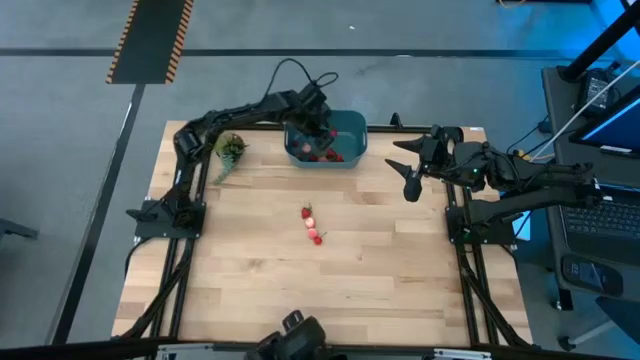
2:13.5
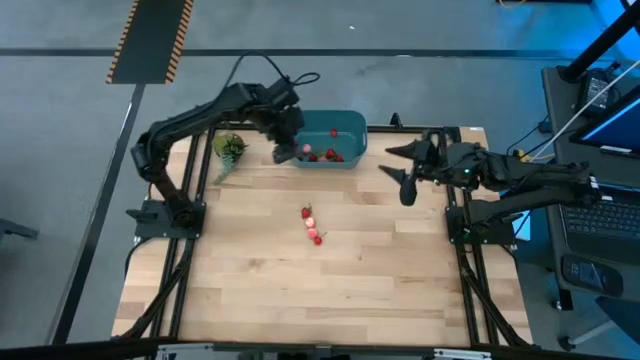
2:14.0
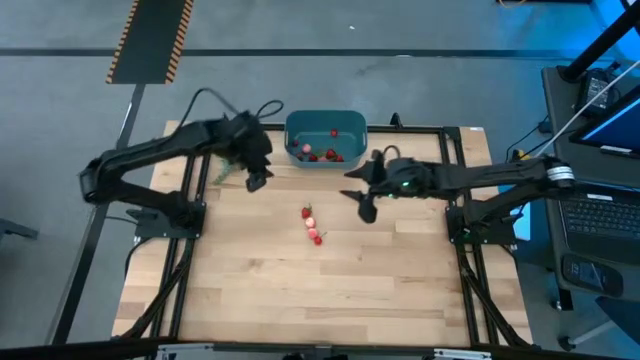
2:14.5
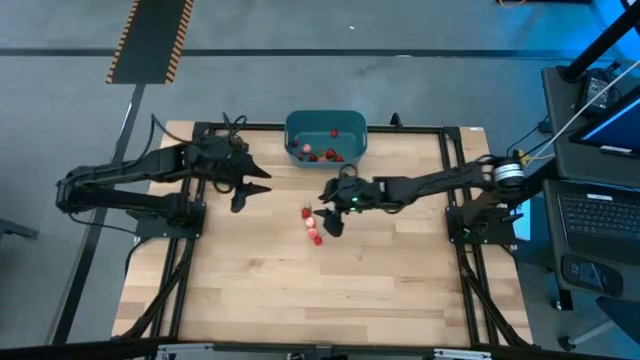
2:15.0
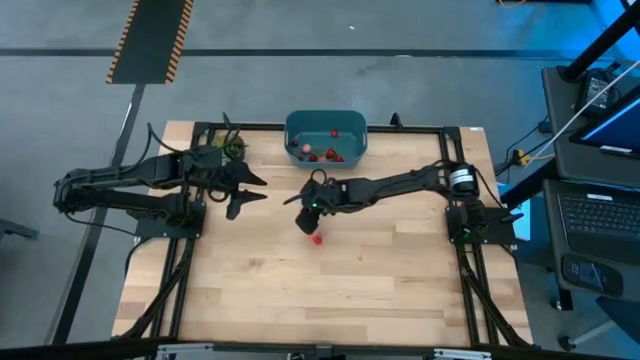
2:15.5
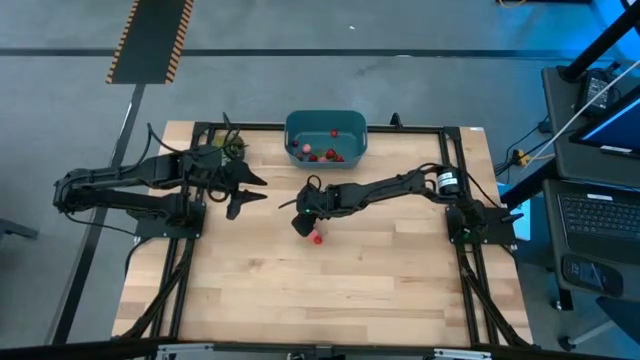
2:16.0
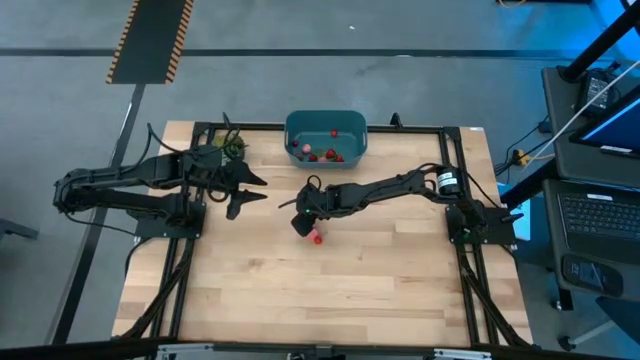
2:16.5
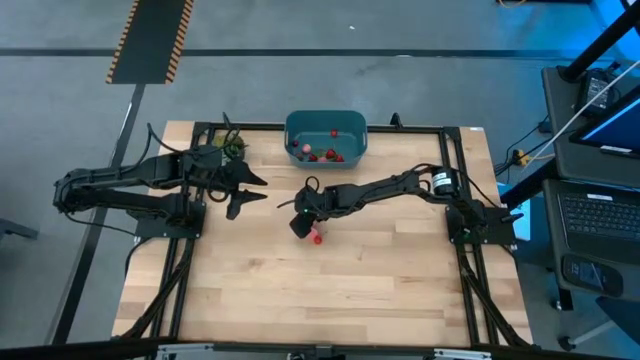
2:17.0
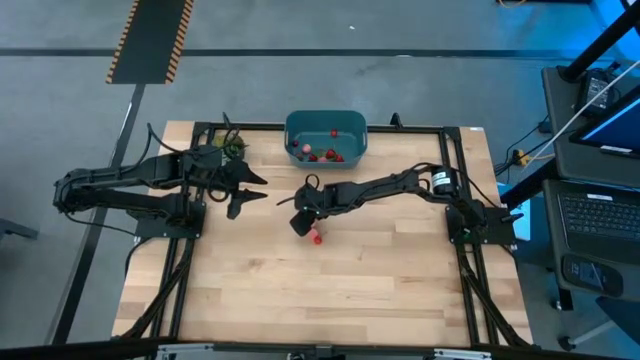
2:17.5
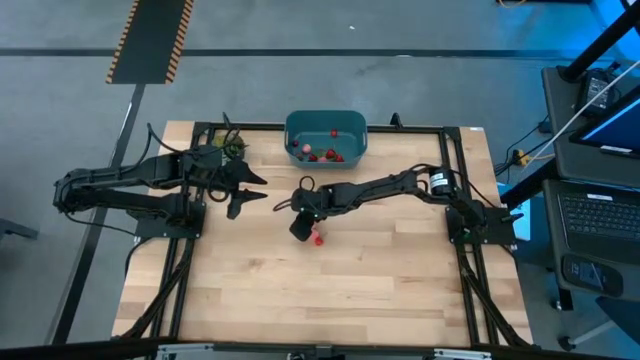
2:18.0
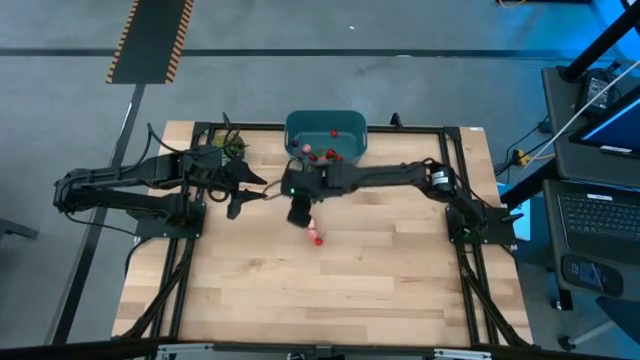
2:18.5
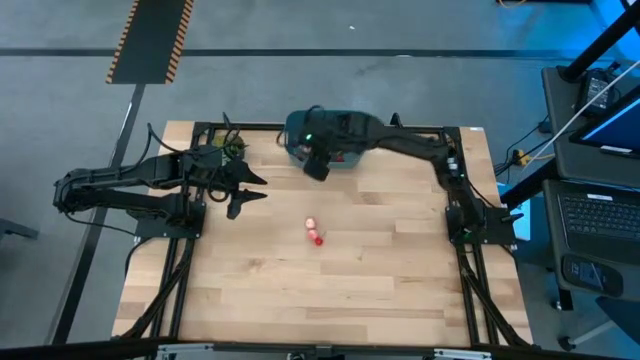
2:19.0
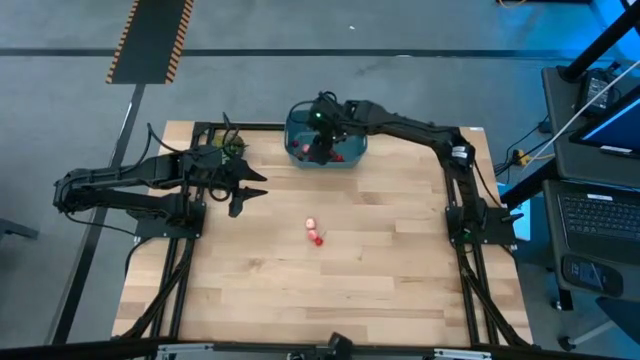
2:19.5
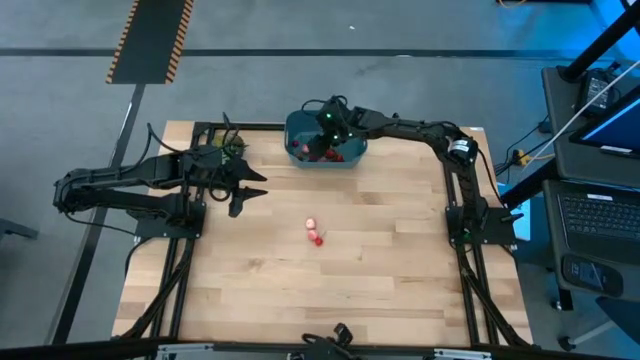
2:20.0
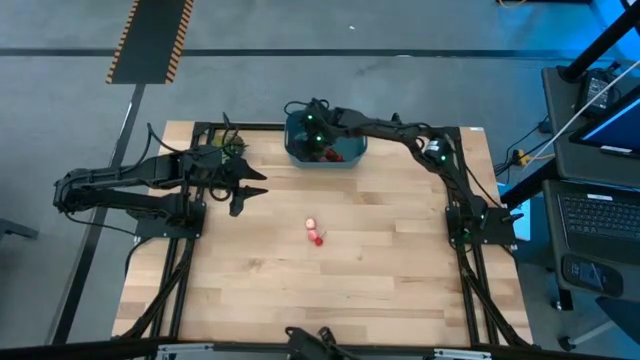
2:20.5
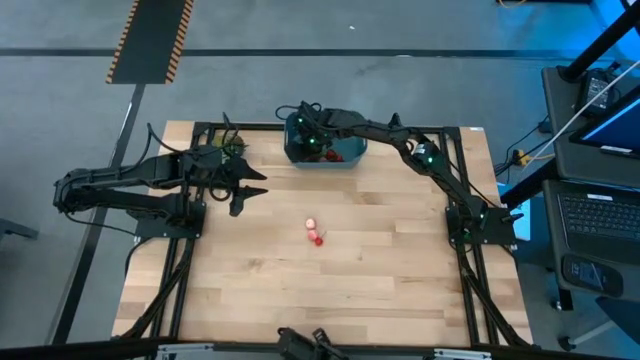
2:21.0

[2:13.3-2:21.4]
Task: Pick and placing Produce into tupperware
Put the strawberry into the blue bin

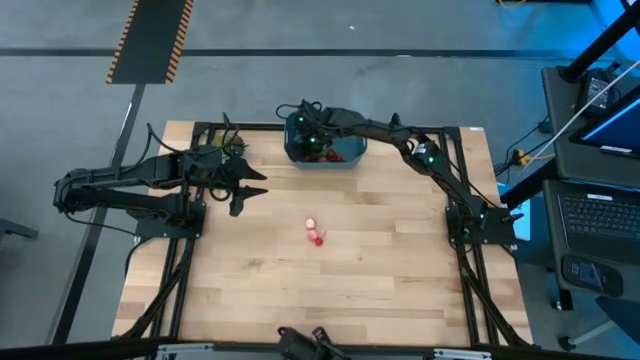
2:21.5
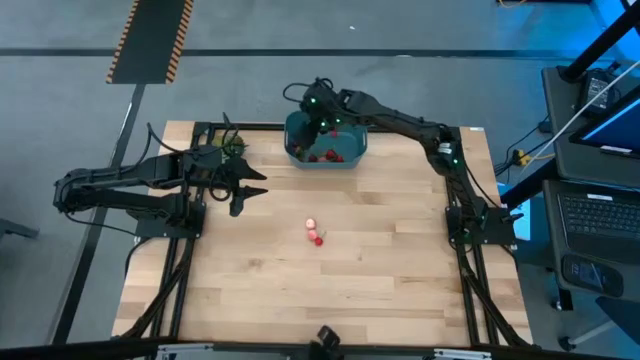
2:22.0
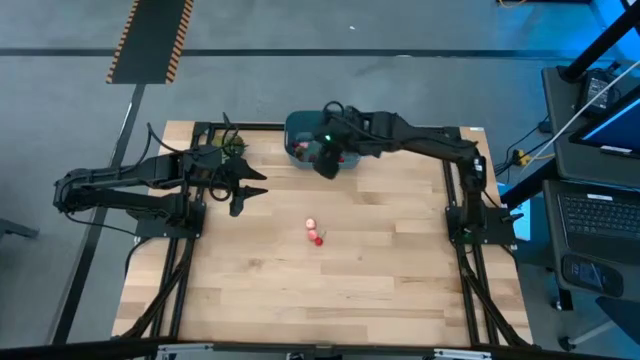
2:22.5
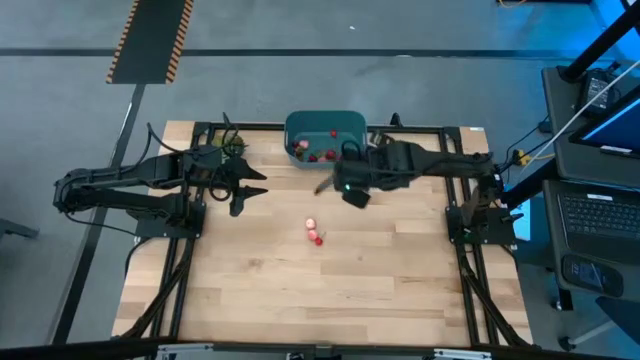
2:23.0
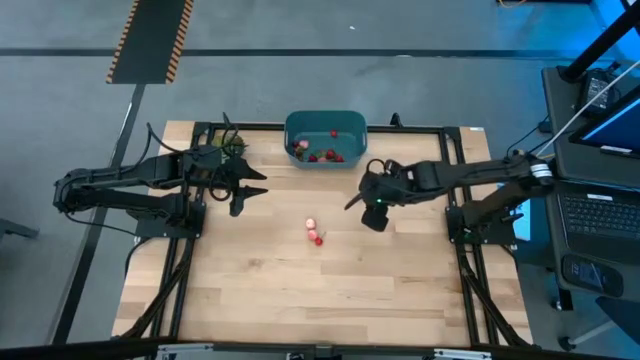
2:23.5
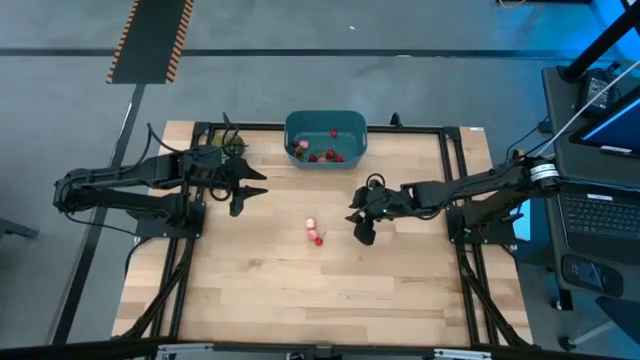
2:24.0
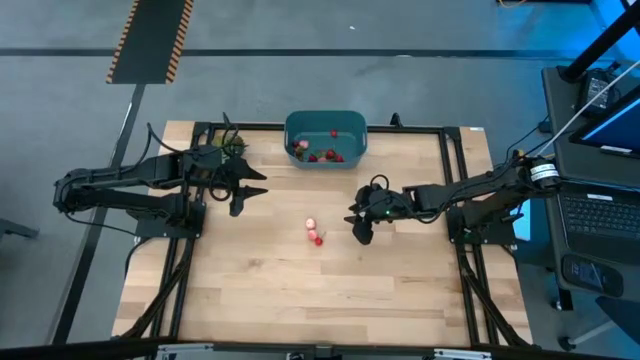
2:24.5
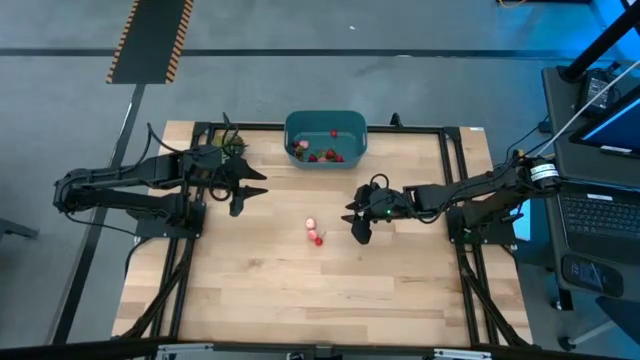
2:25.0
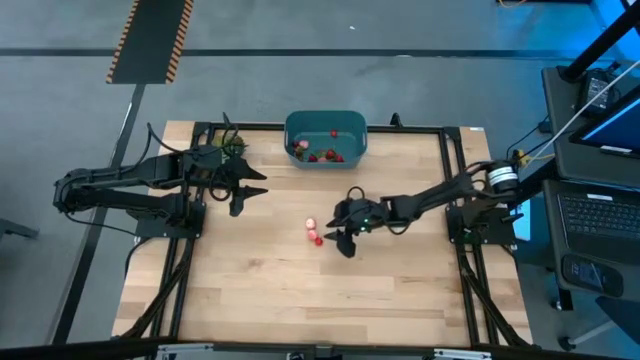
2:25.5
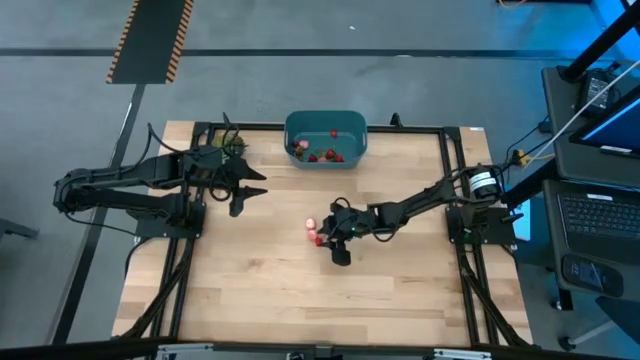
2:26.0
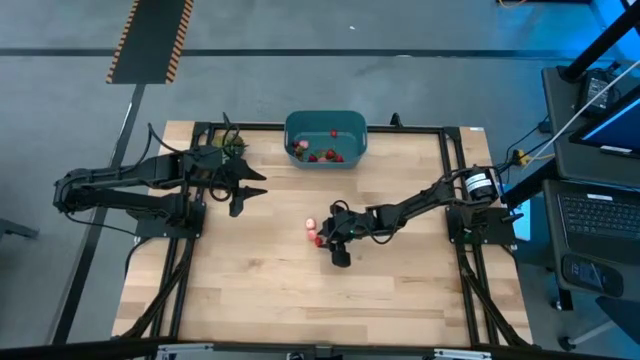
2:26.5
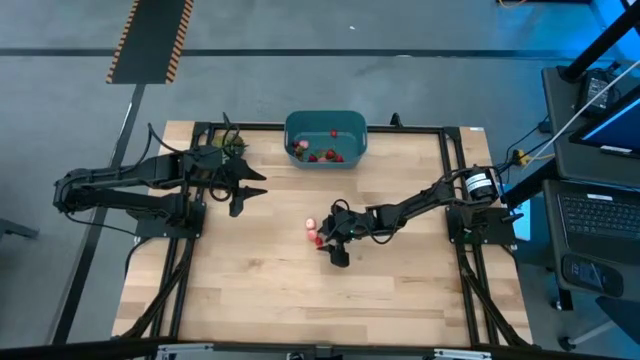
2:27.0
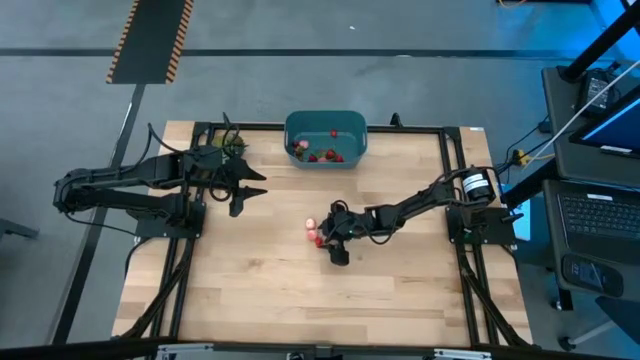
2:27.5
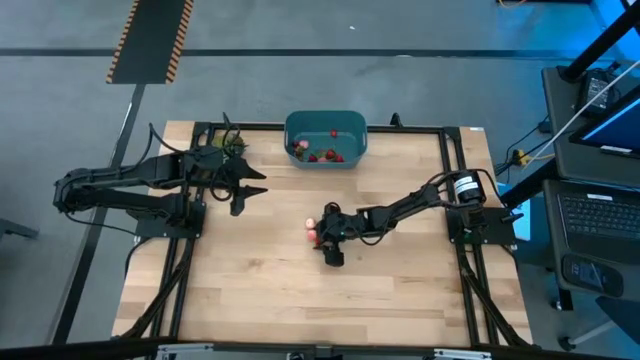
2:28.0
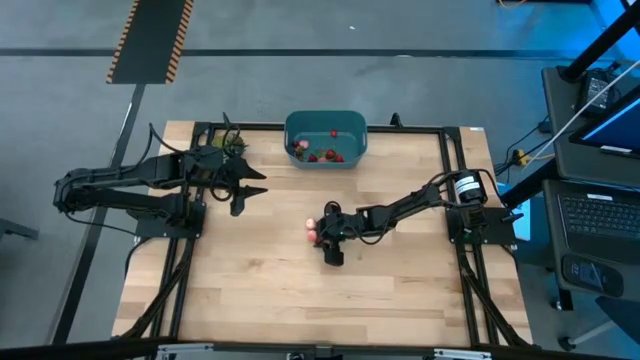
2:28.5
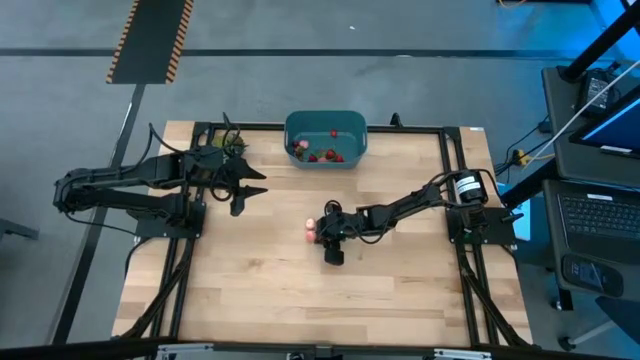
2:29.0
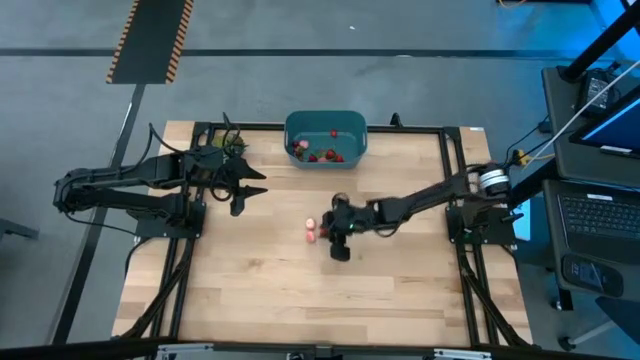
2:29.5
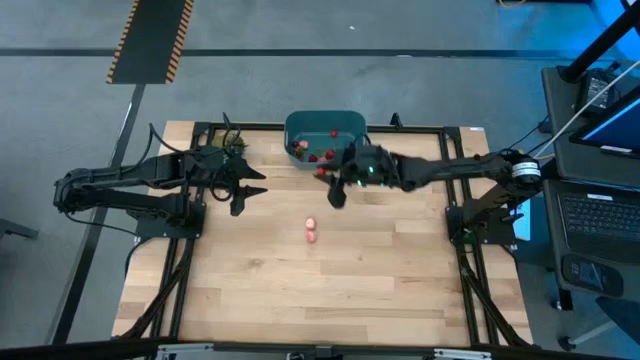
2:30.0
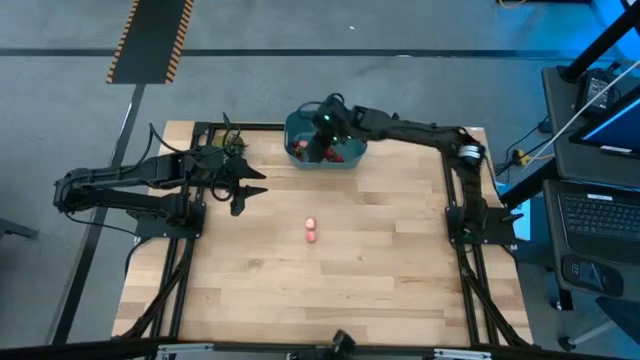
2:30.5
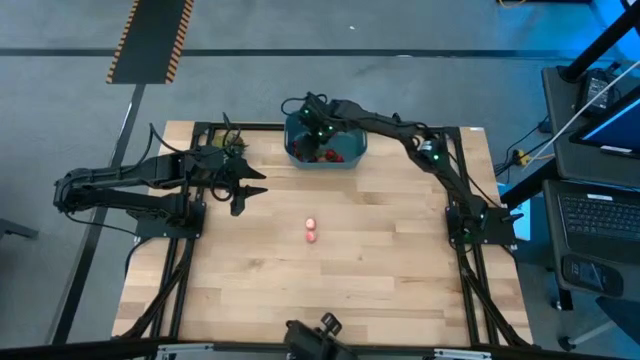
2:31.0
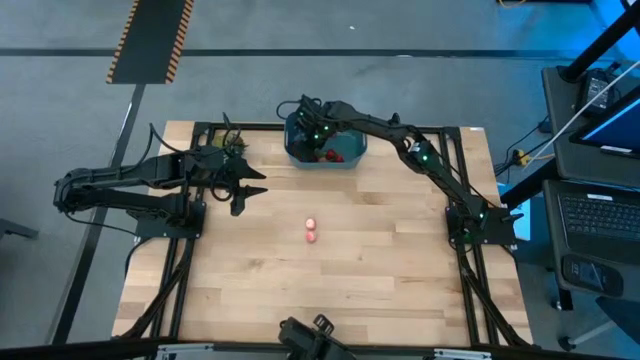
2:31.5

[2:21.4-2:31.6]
Put the cherry into the blue bin

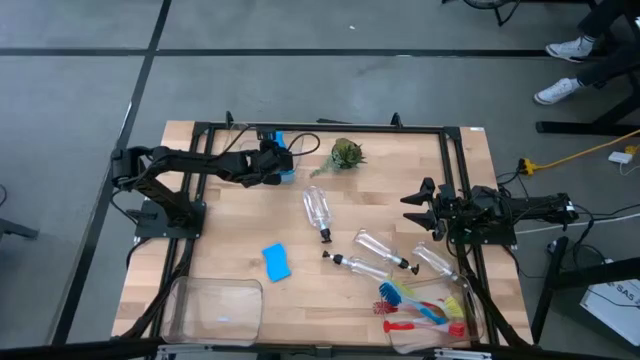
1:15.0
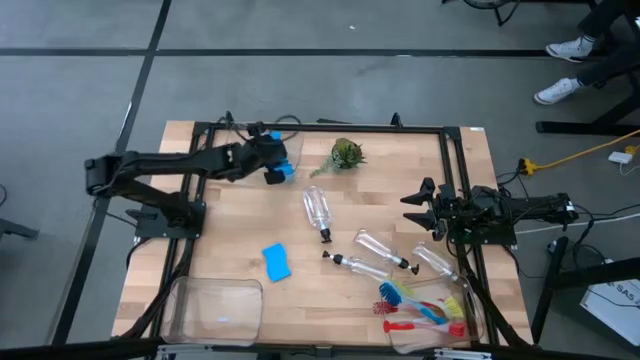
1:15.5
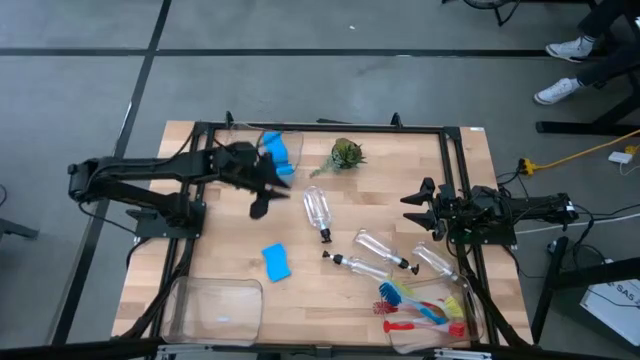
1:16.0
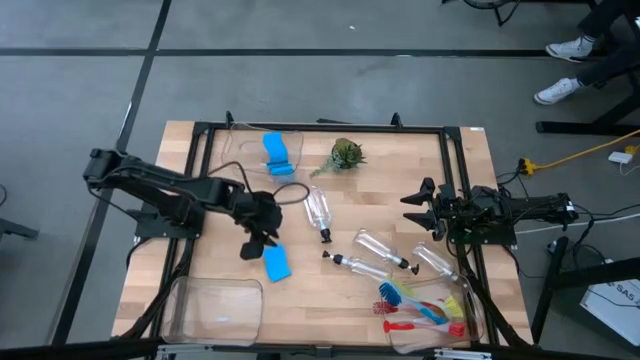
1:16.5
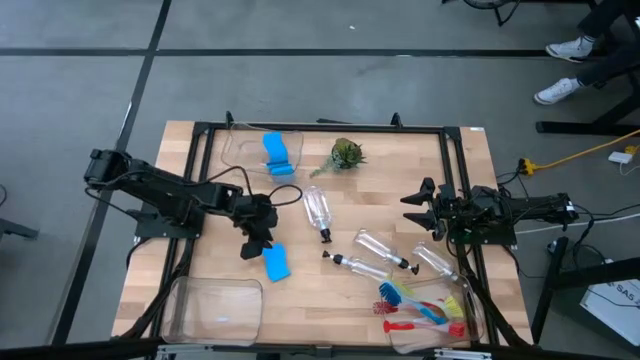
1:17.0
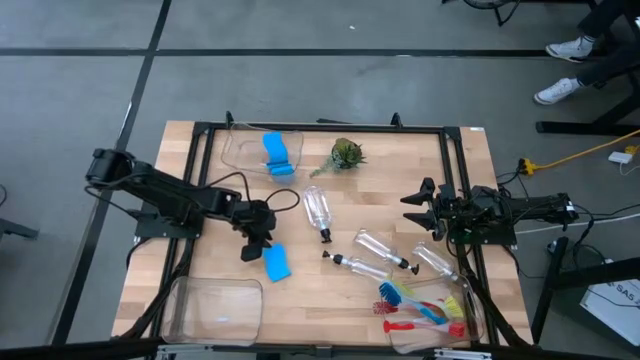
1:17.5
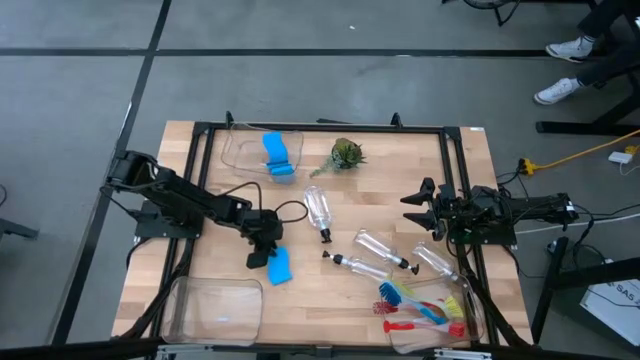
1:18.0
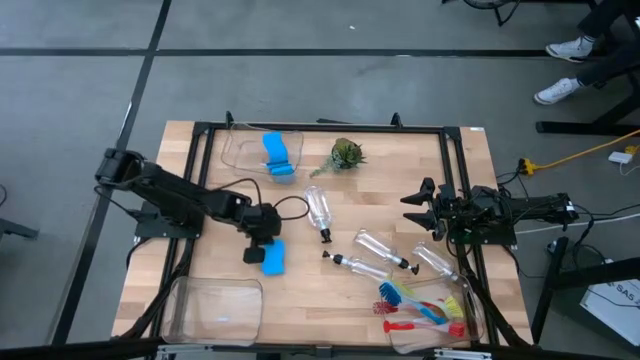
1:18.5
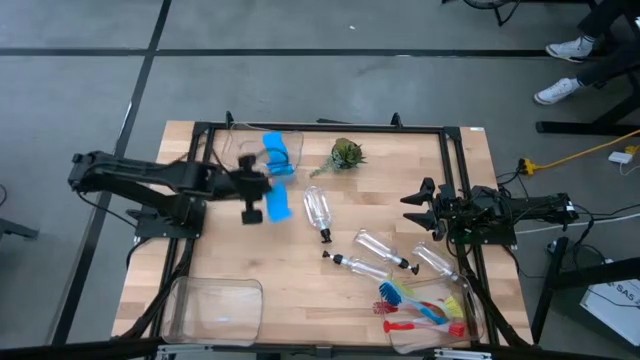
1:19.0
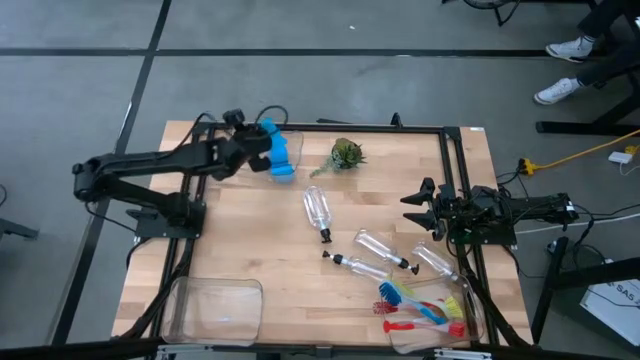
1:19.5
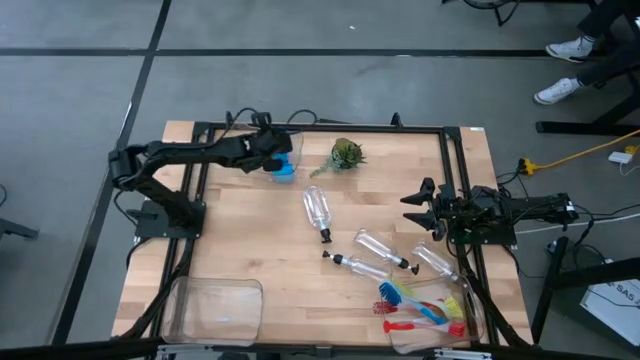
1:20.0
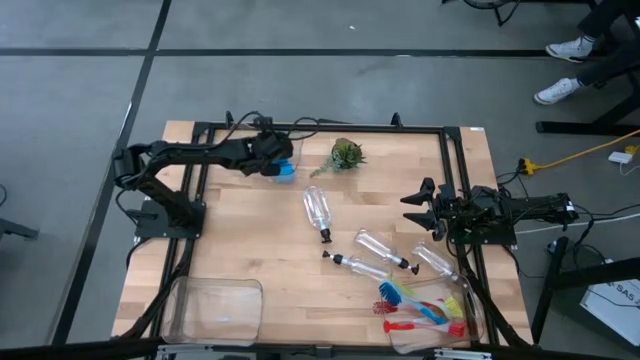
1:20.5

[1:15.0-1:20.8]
Task: Pick & Place Kitchen Sink Supplies
Put the blue sponge into the top transparent bin
